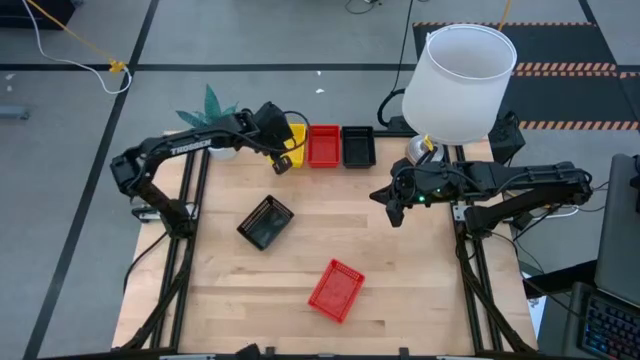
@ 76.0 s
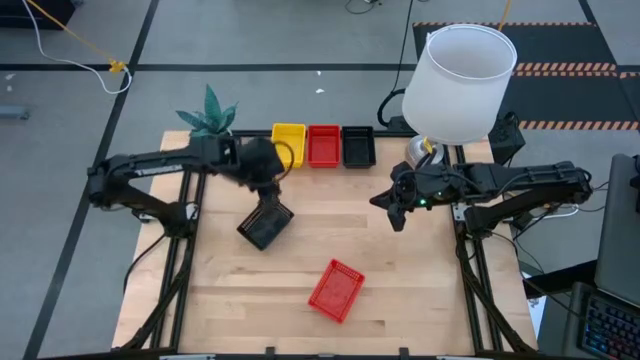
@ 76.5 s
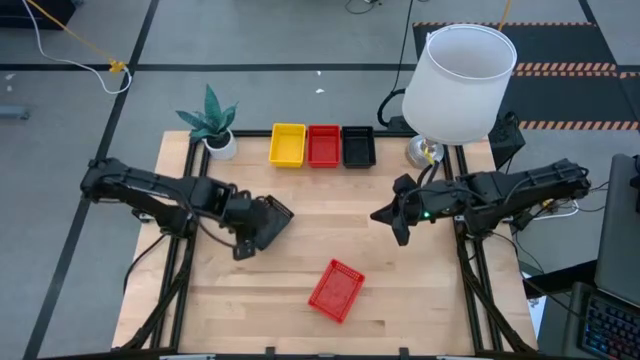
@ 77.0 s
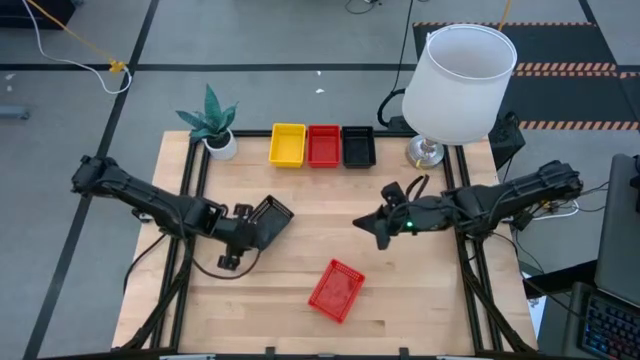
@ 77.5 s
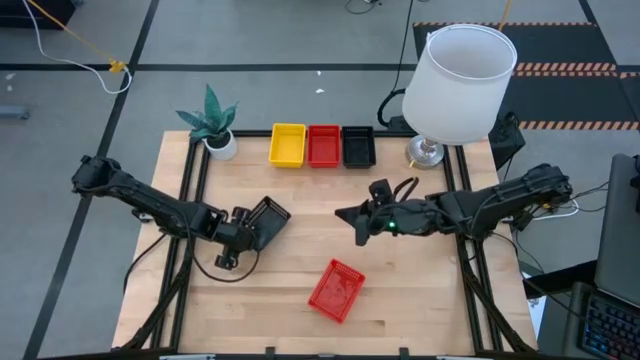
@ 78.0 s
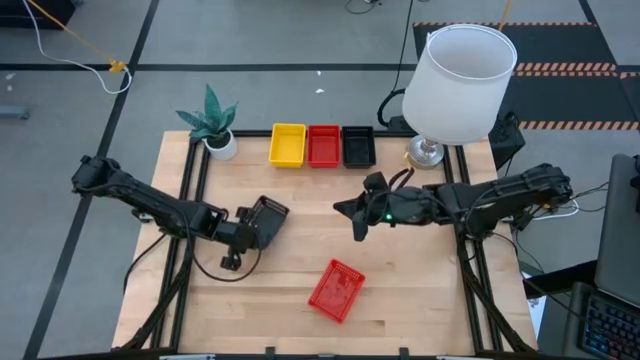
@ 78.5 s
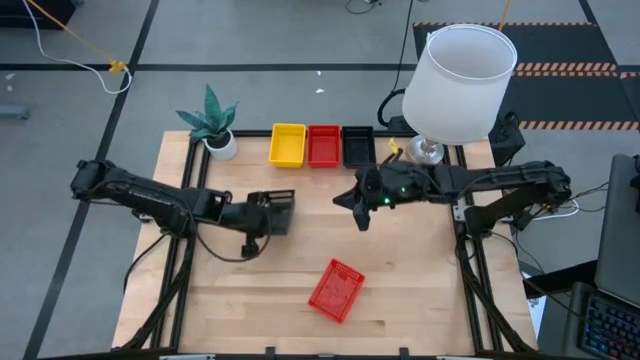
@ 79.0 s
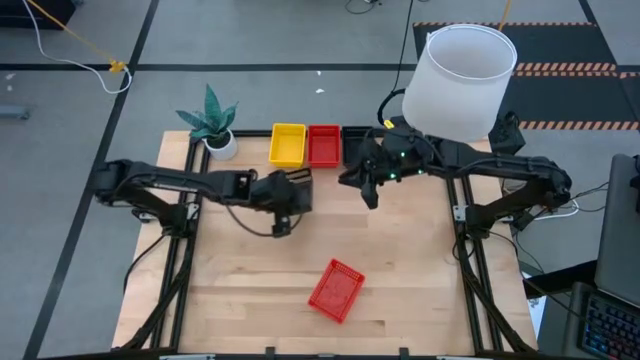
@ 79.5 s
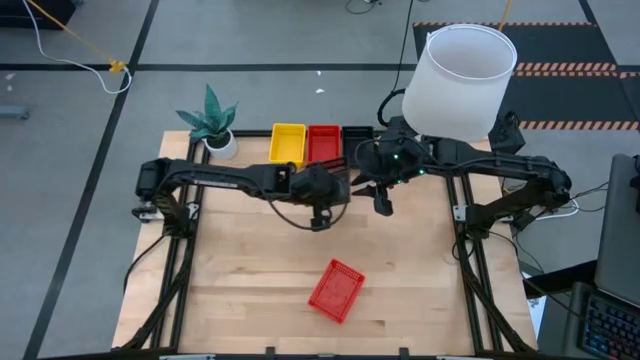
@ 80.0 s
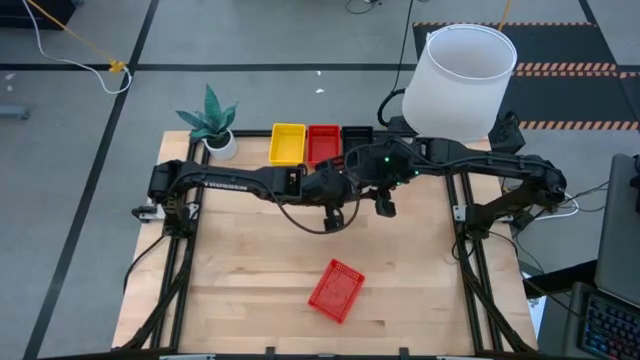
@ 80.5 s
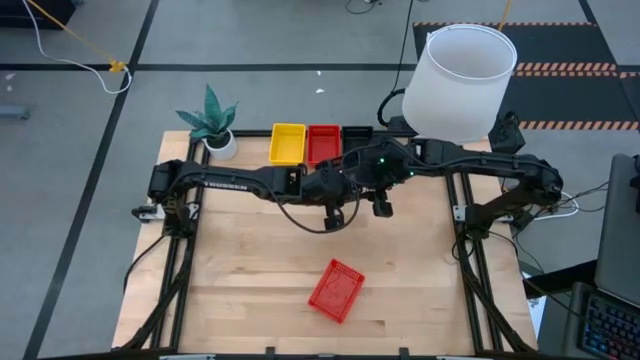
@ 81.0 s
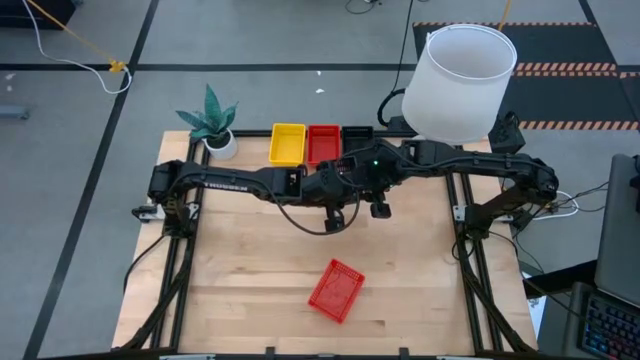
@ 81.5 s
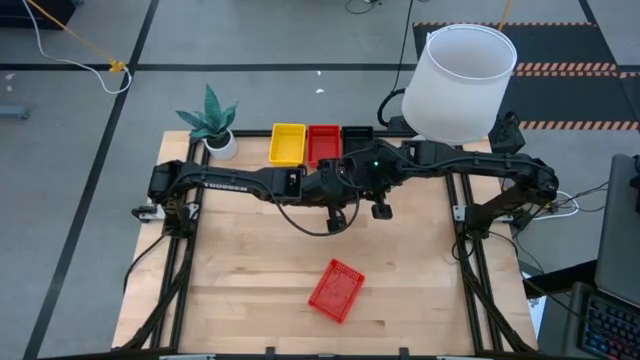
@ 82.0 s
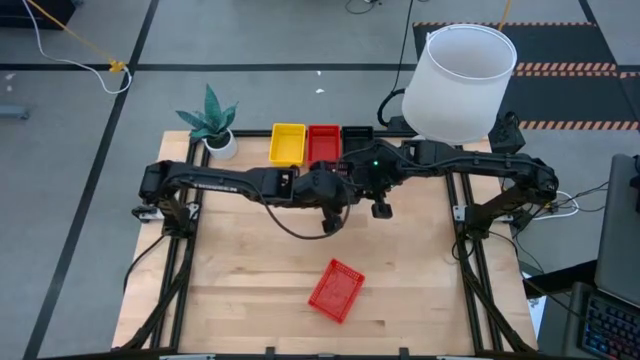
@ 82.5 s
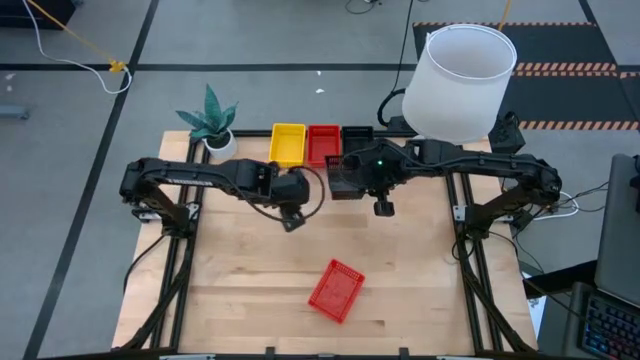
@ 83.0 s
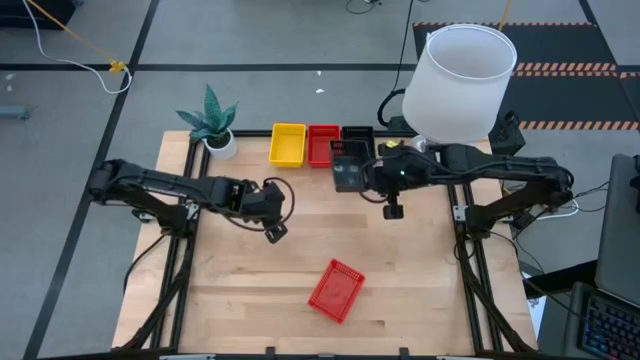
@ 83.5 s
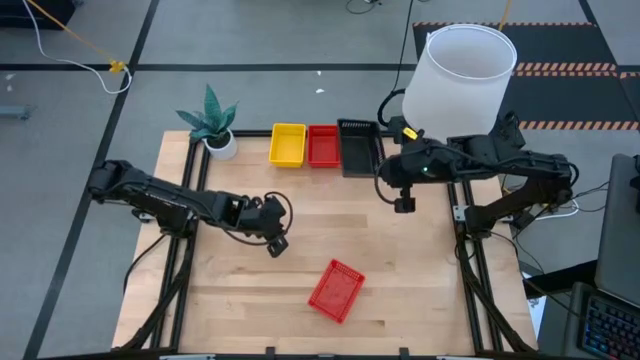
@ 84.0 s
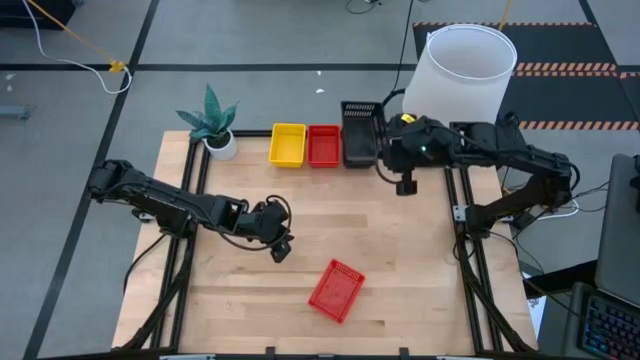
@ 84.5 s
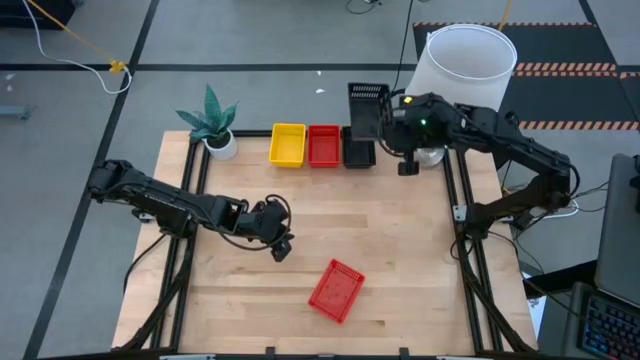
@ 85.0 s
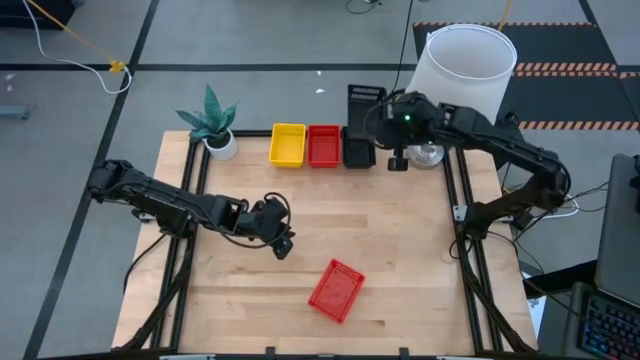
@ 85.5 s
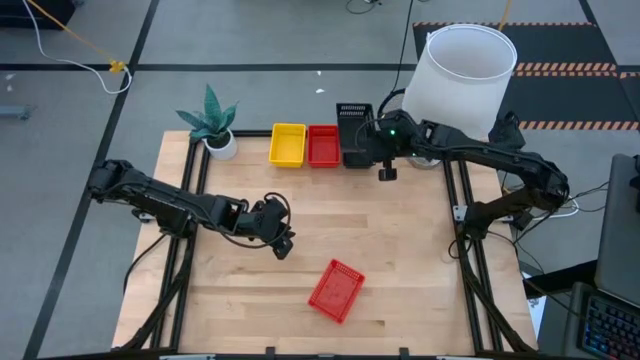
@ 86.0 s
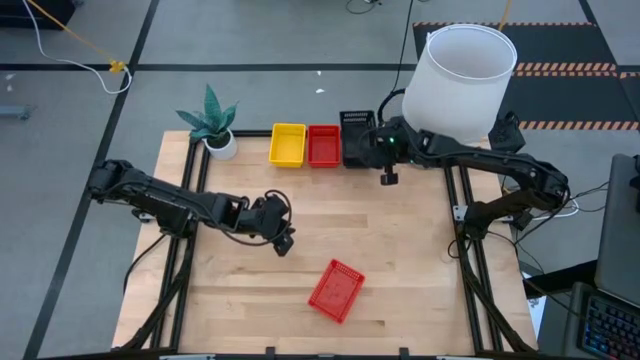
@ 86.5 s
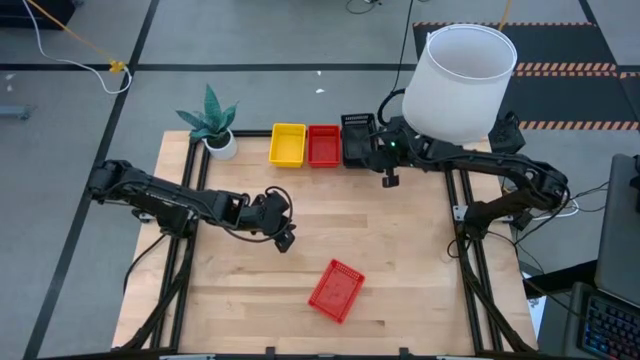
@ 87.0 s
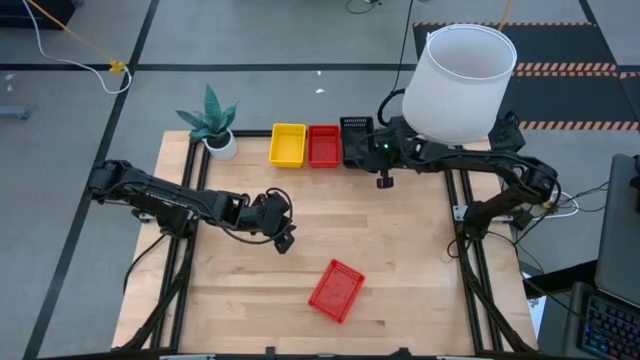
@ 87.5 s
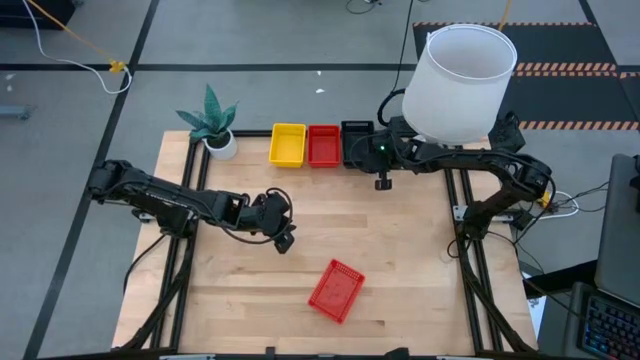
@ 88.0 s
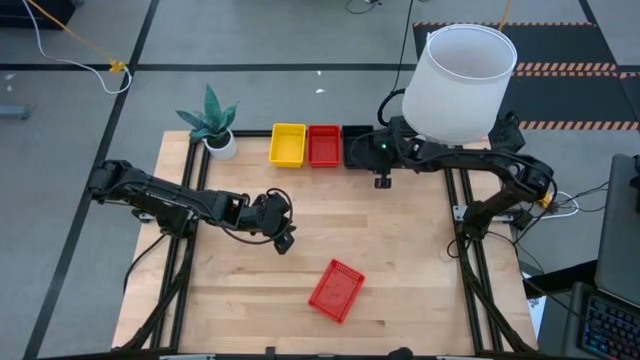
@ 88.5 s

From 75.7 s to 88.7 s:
Stack the bottom black basket on the top black basket

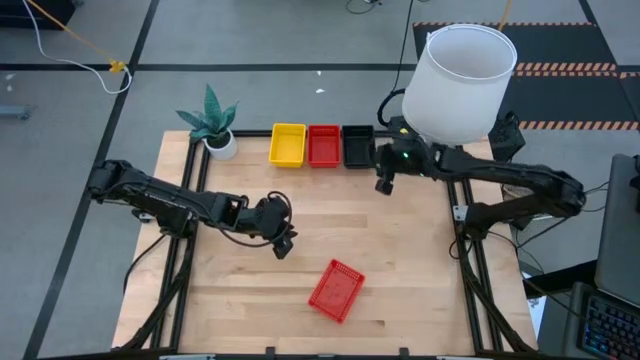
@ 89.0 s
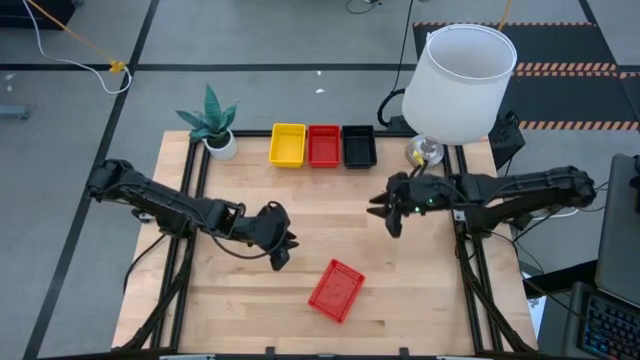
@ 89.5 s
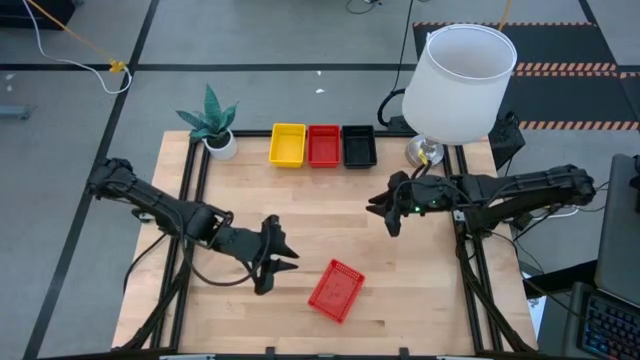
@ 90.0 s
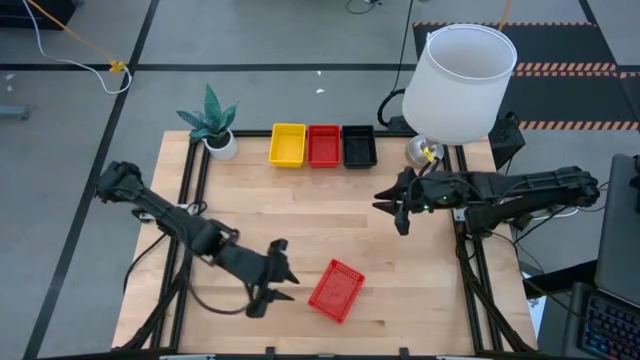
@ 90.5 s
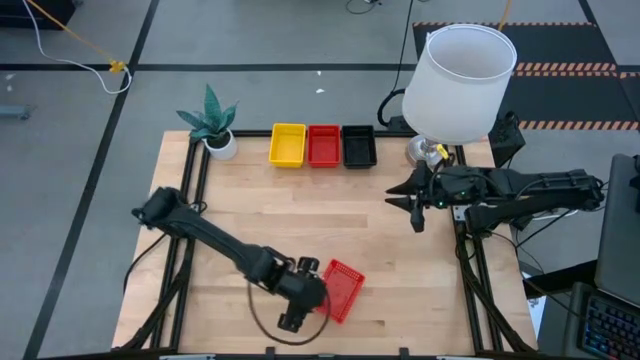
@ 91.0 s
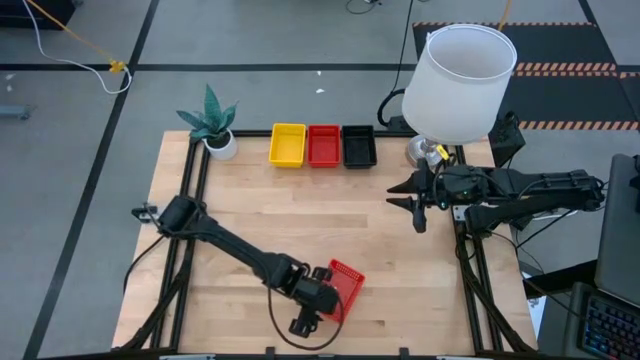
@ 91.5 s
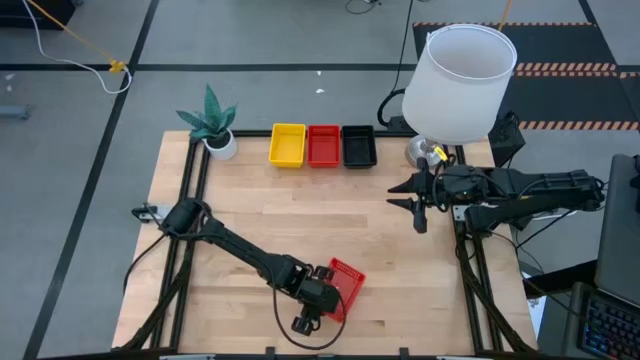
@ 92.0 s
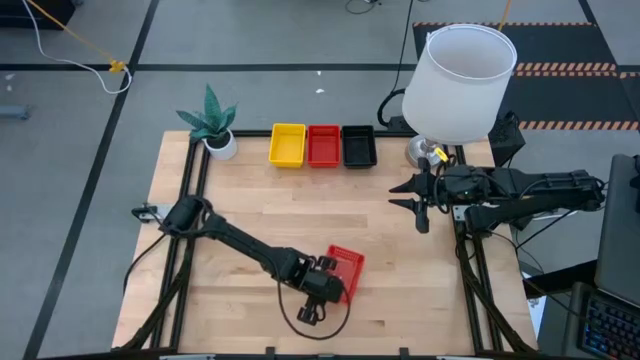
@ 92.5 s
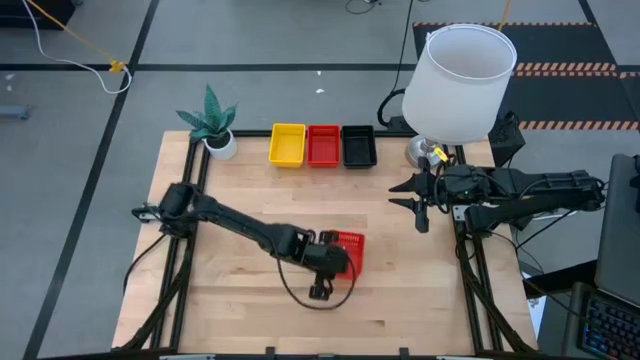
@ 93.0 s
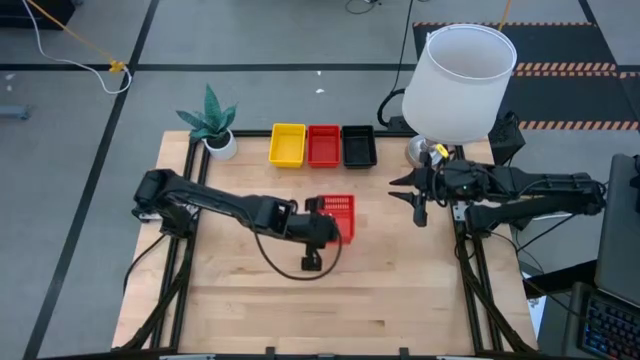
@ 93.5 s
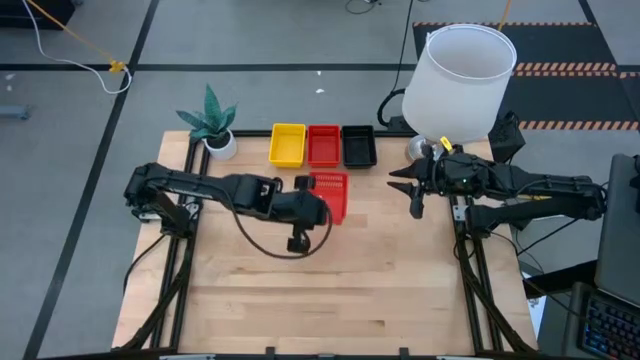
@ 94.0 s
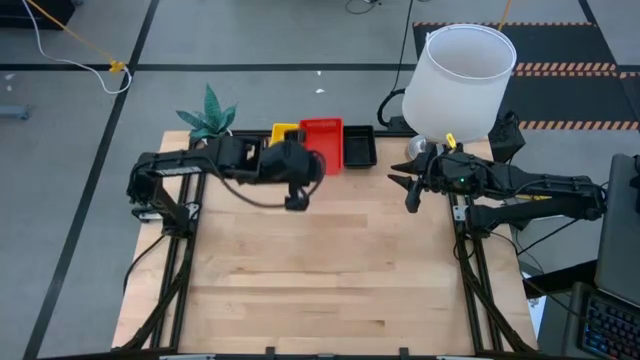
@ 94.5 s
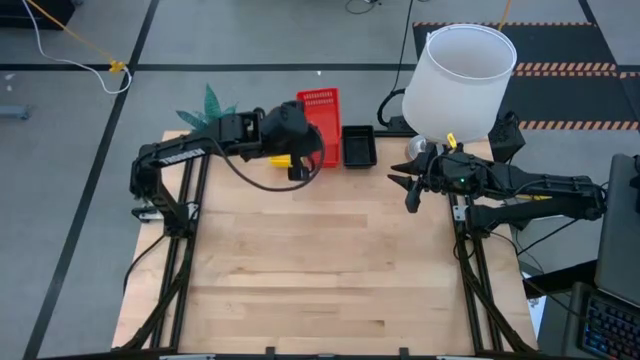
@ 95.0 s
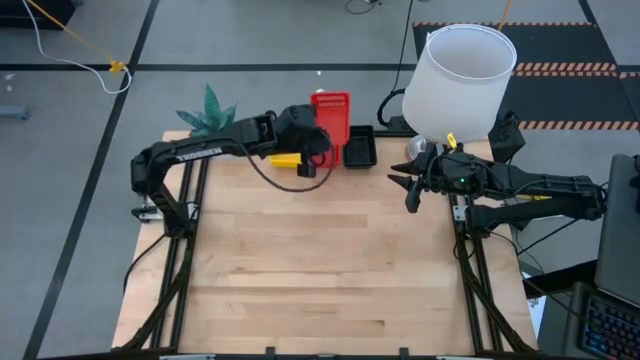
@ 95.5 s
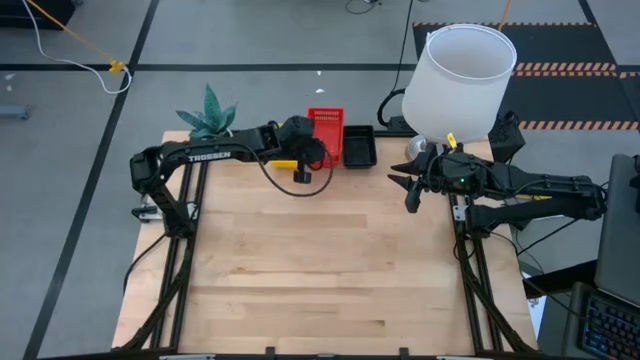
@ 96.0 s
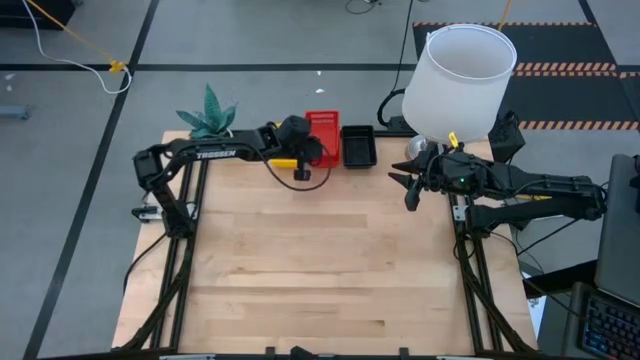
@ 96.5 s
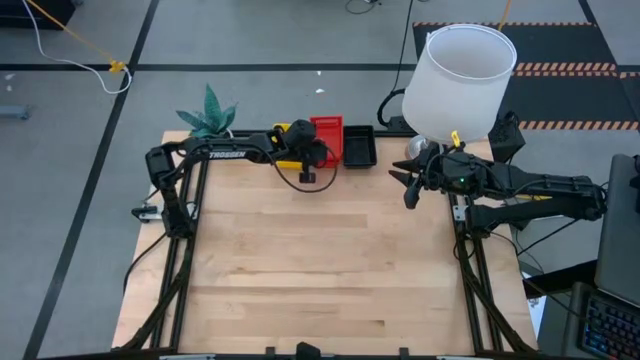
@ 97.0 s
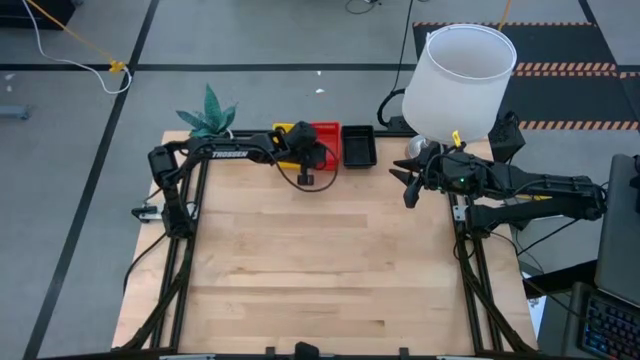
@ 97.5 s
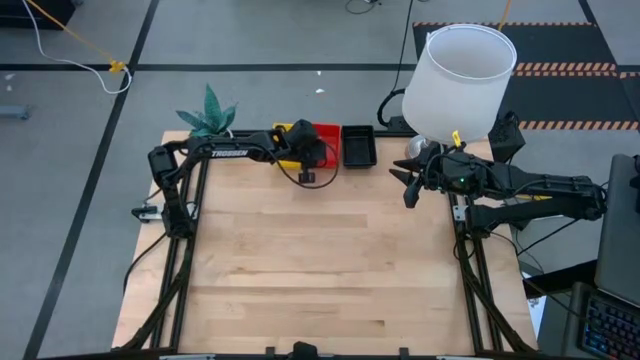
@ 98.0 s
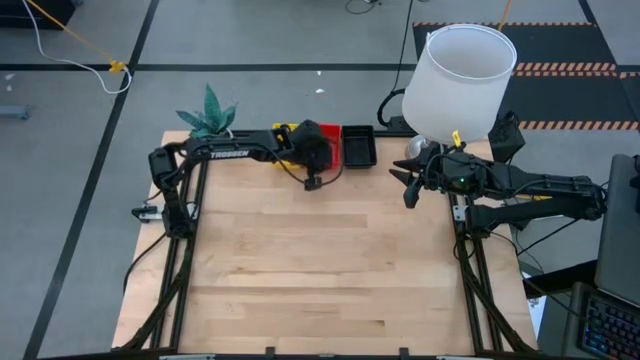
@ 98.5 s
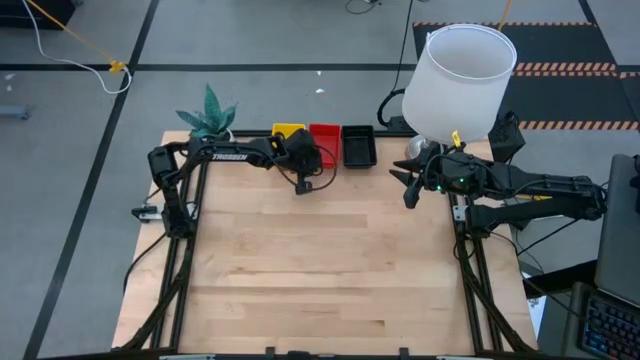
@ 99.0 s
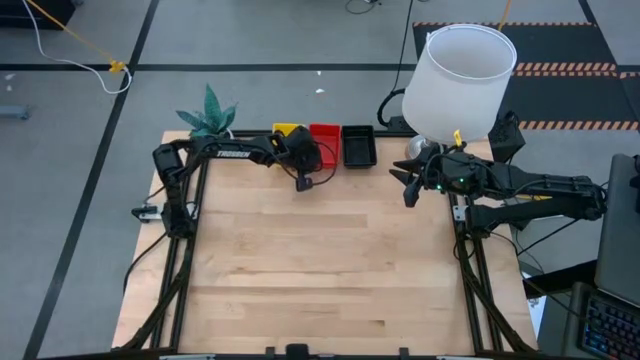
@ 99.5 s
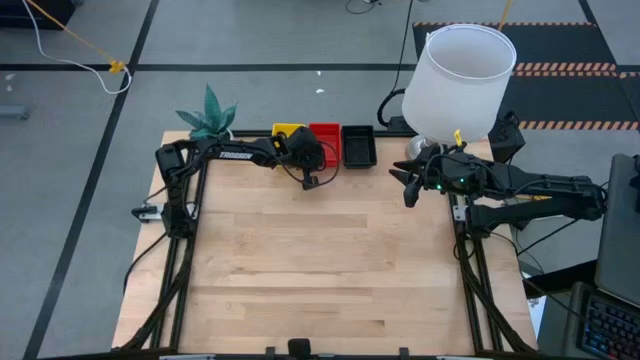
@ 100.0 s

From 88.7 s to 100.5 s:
Stack the bottom red basket on the top red basket
